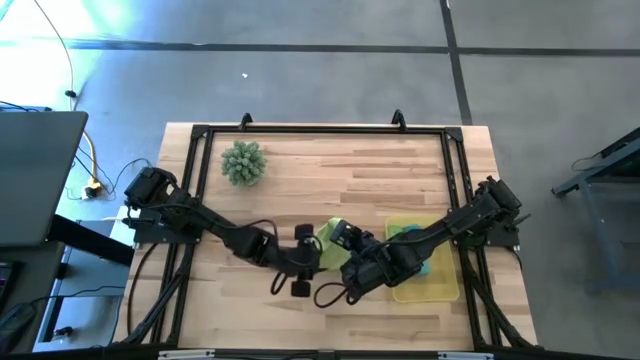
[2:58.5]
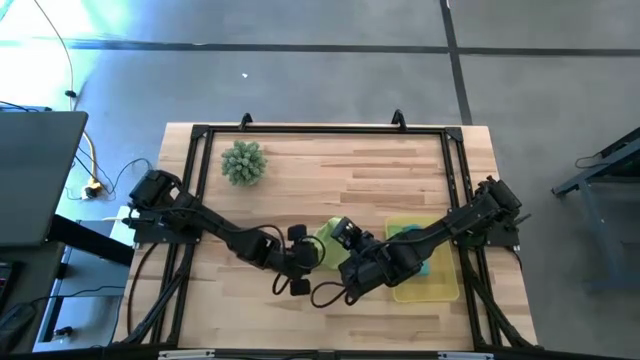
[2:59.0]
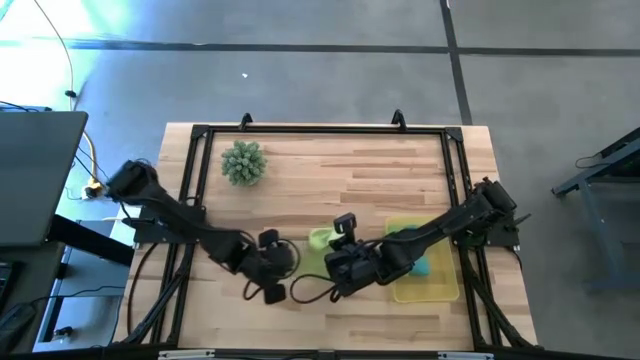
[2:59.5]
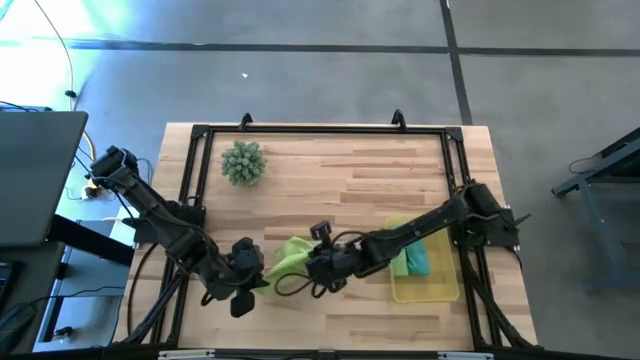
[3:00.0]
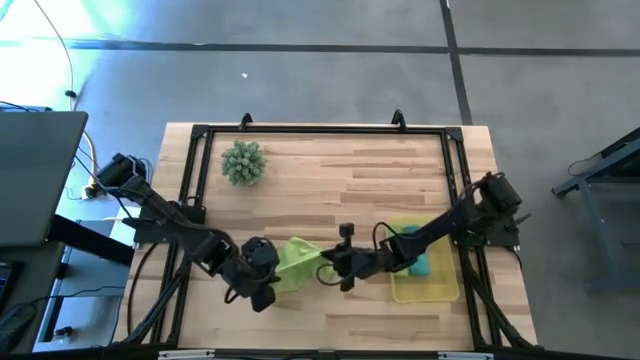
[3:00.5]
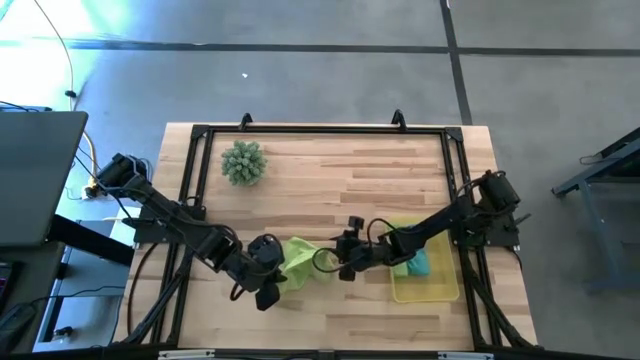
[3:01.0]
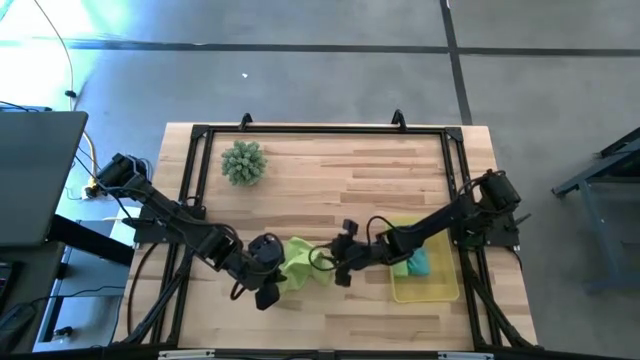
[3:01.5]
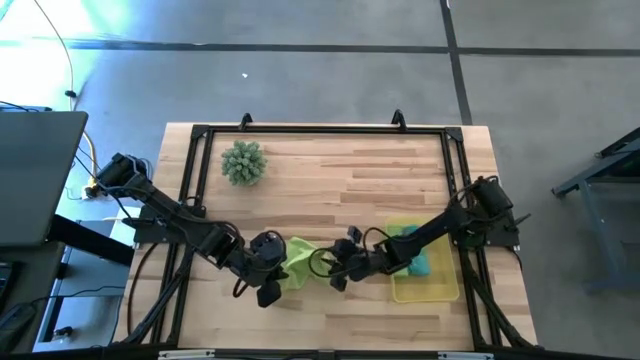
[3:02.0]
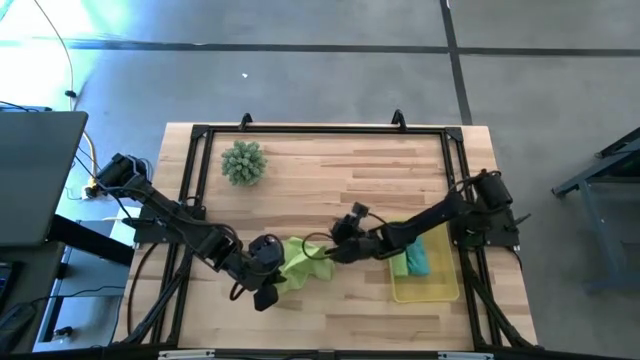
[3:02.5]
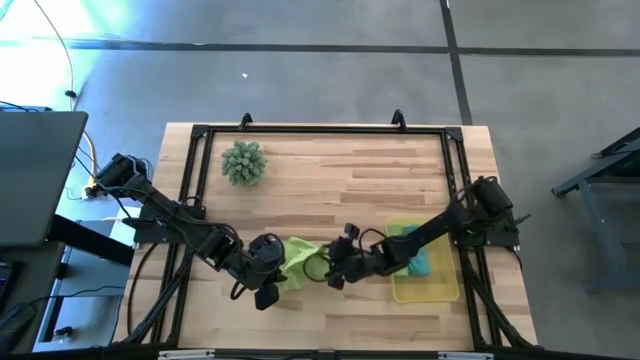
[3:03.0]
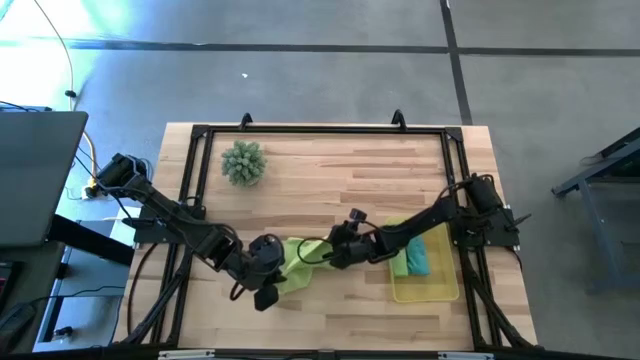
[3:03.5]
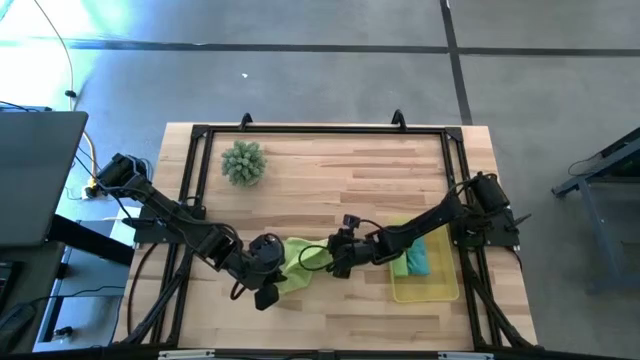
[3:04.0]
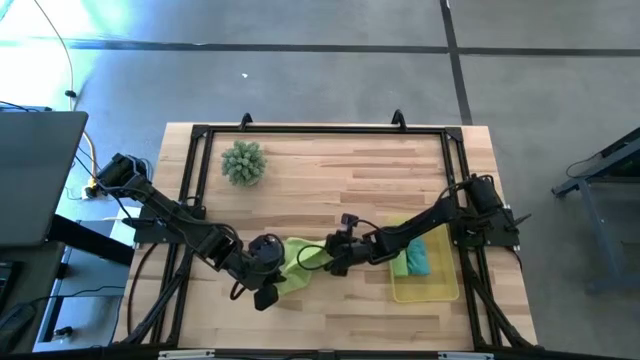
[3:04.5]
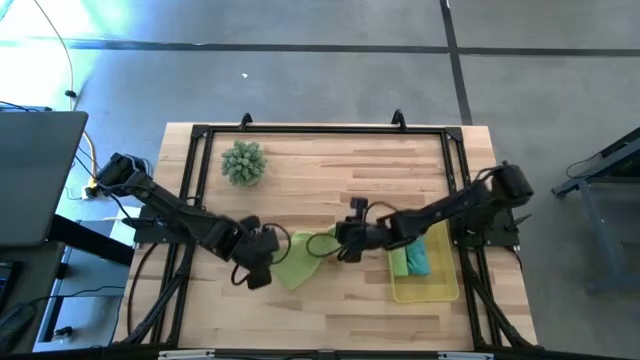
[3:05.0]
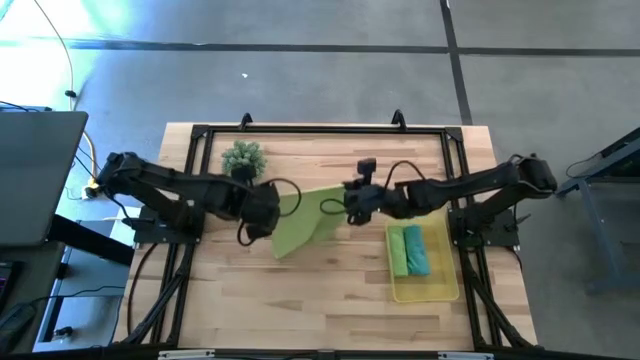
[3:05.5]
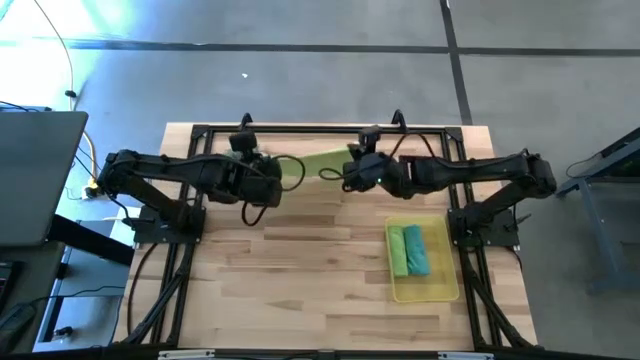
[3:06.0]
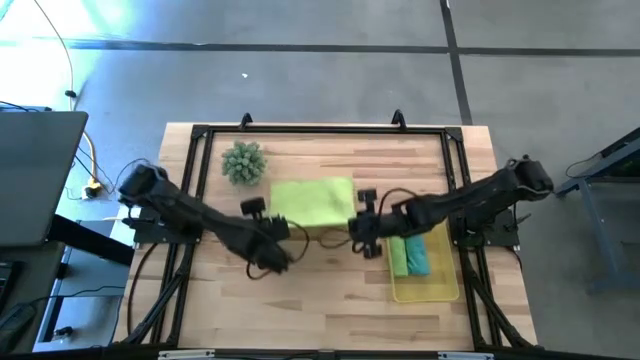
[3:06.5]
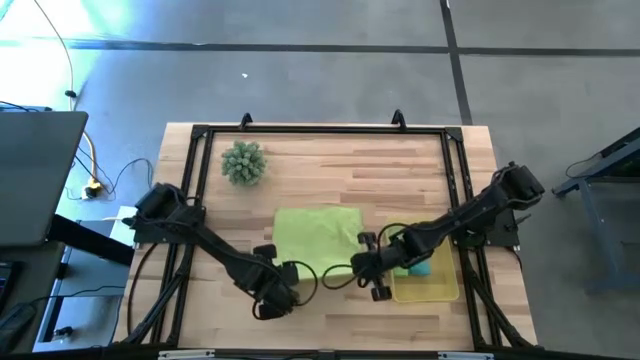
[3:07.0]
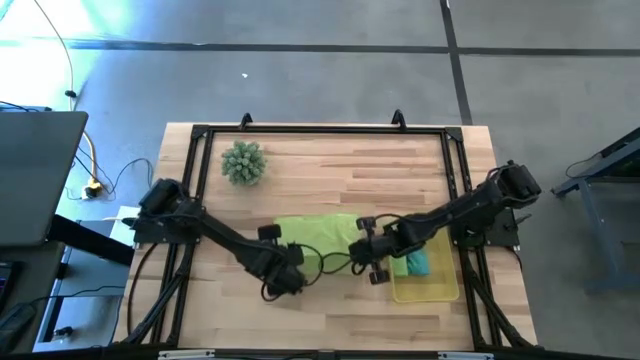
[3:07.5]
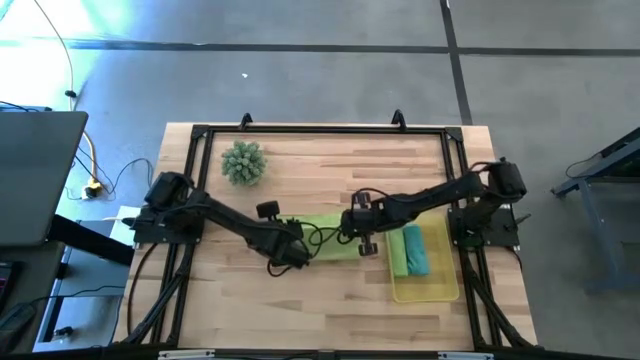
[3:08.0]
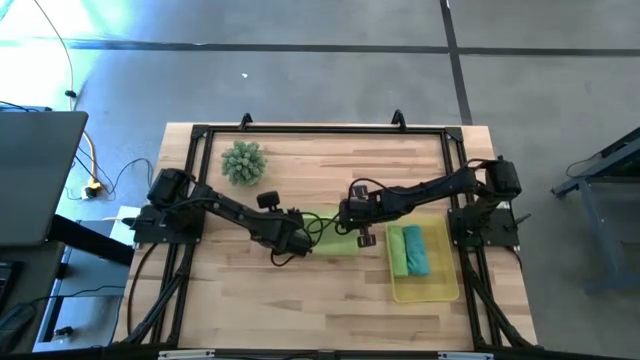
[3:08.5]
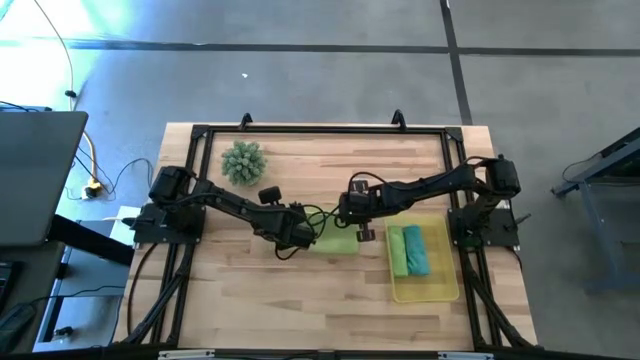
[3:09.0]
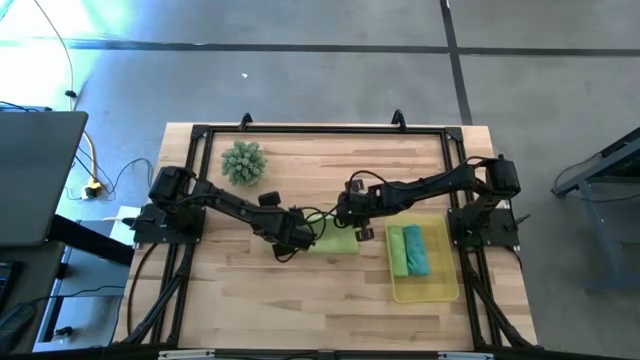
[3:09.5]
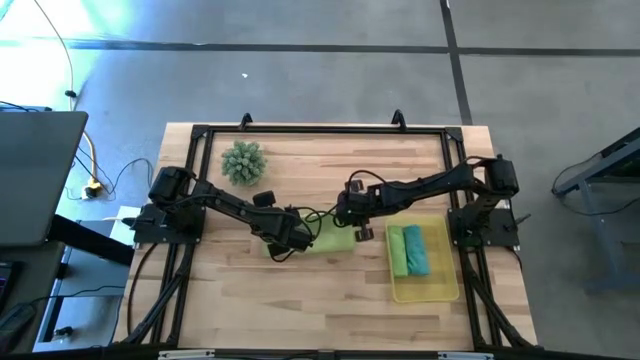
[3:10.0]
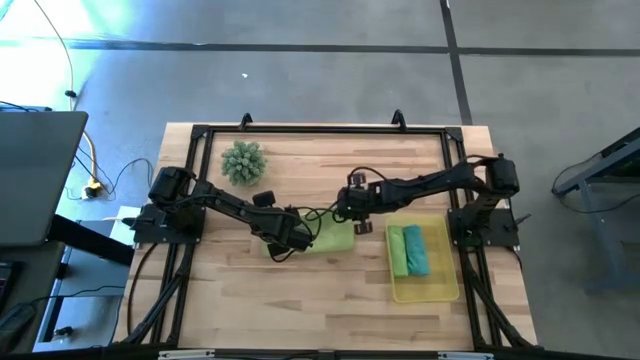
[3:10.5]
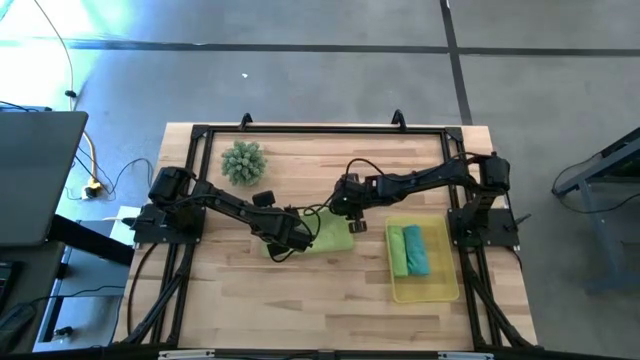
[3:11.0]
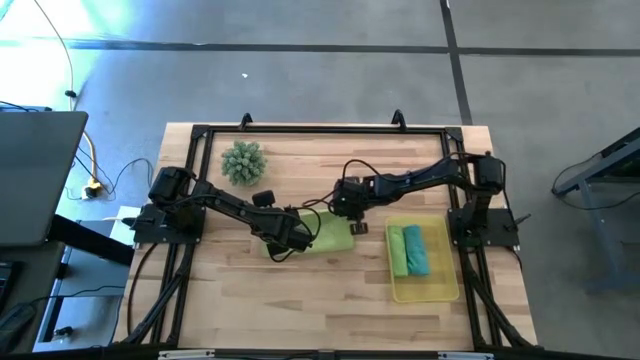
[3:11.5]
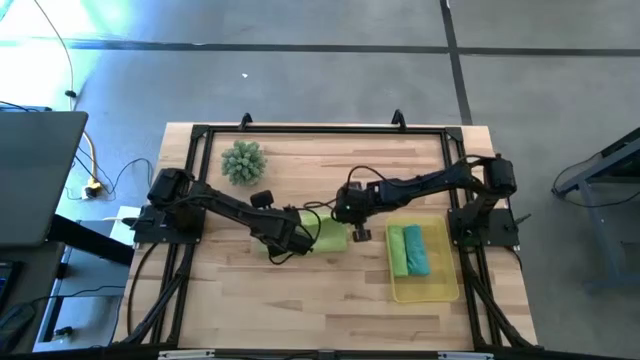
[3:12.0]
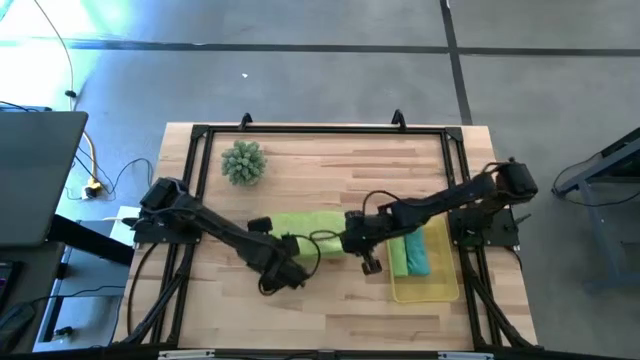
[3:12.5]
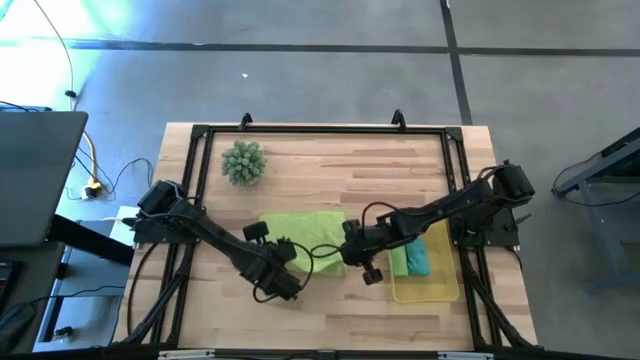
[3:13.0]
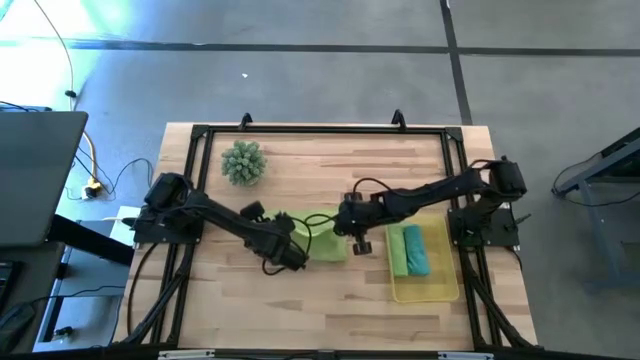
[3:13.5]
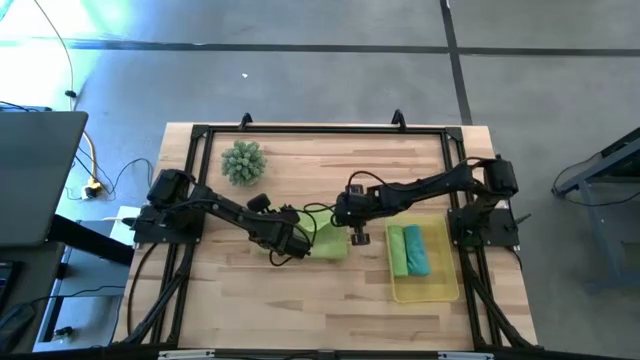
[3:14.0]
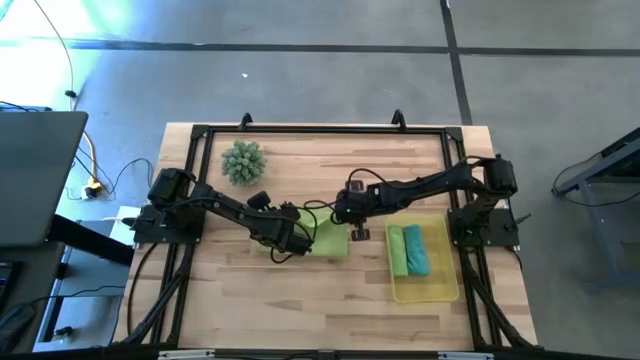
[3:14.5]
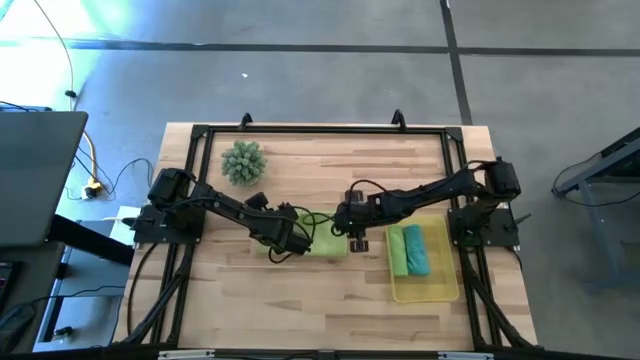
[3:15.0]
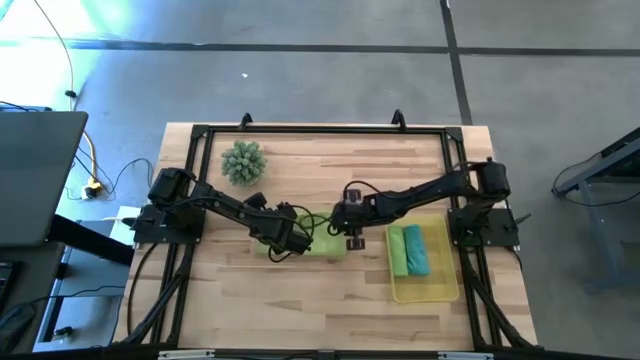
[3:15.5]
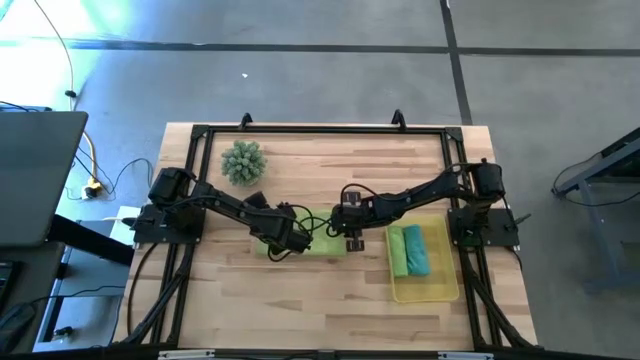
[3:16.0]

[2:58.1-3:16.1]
Task: Roll microfiber towels into tight, uniform cylinder then place into a basket
Fold the light green cloth

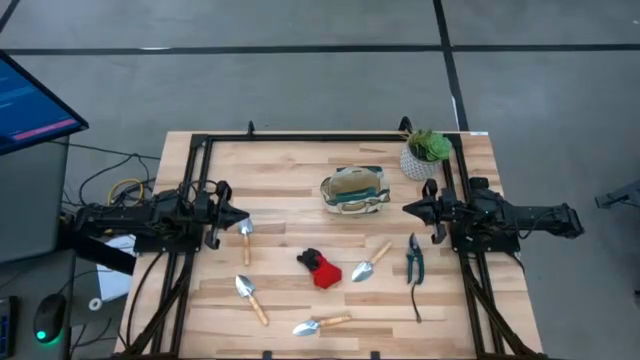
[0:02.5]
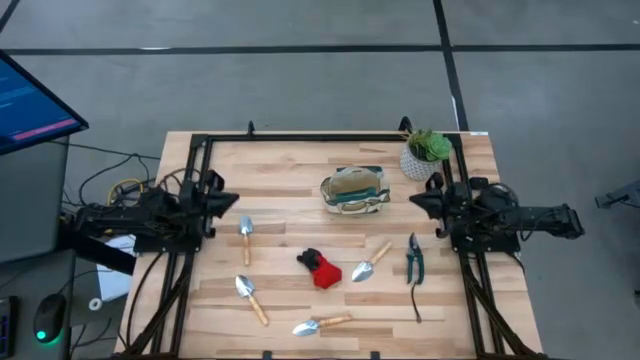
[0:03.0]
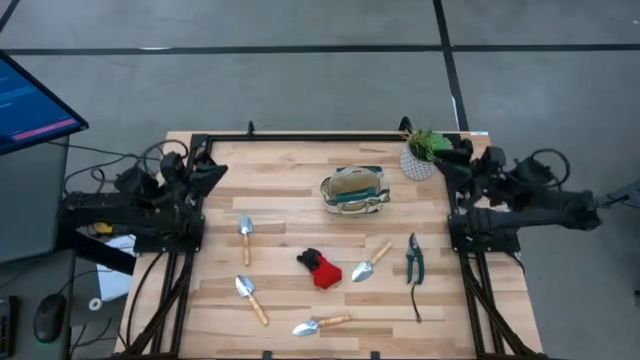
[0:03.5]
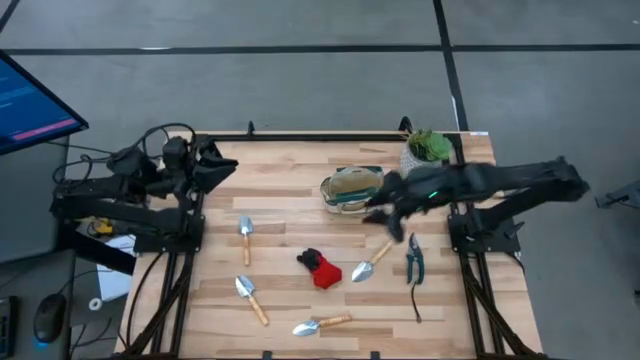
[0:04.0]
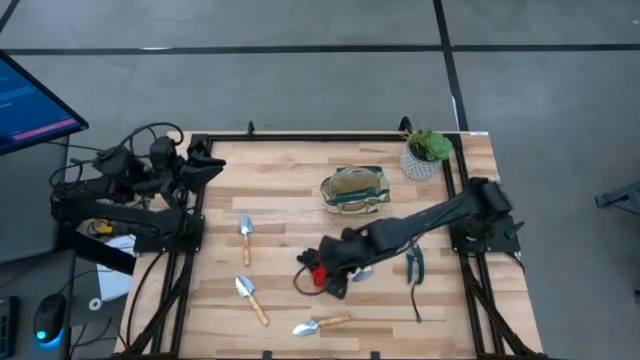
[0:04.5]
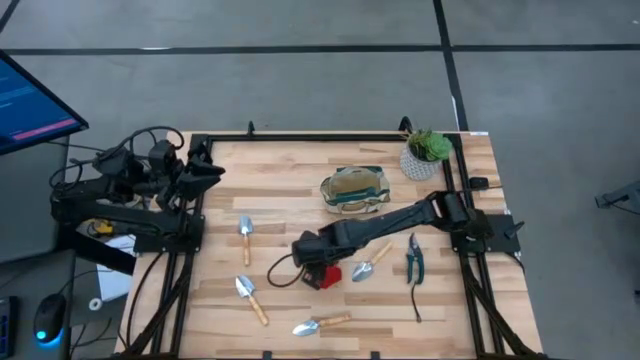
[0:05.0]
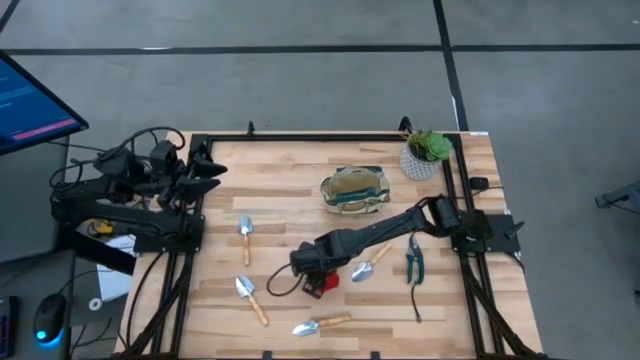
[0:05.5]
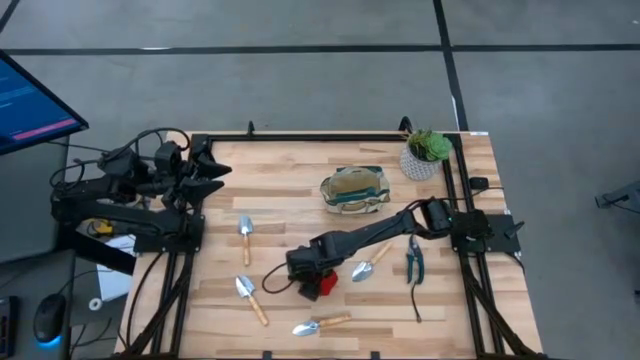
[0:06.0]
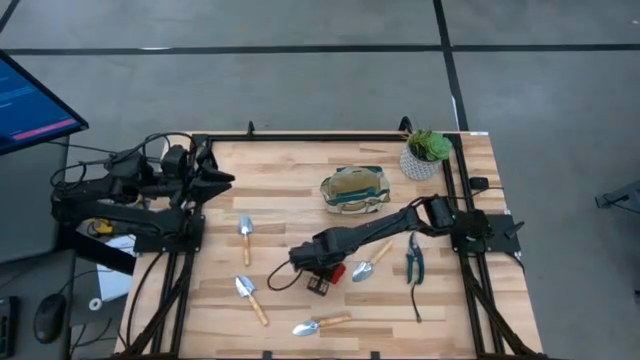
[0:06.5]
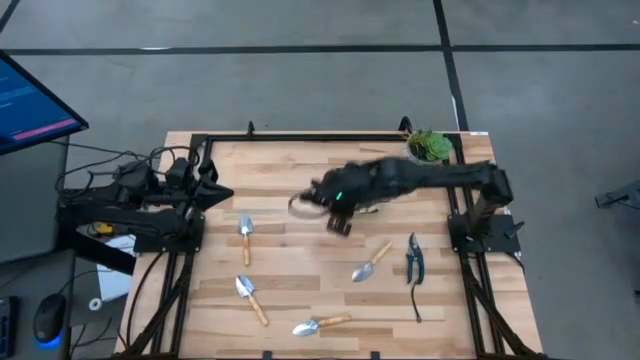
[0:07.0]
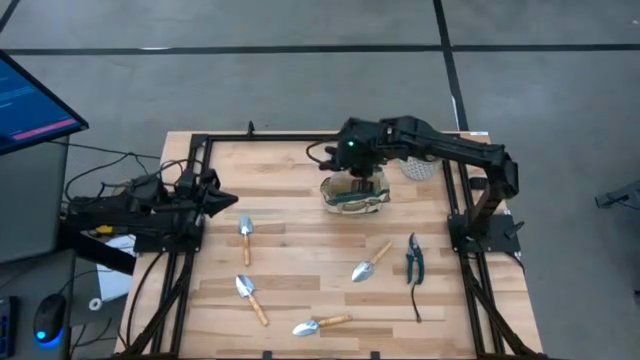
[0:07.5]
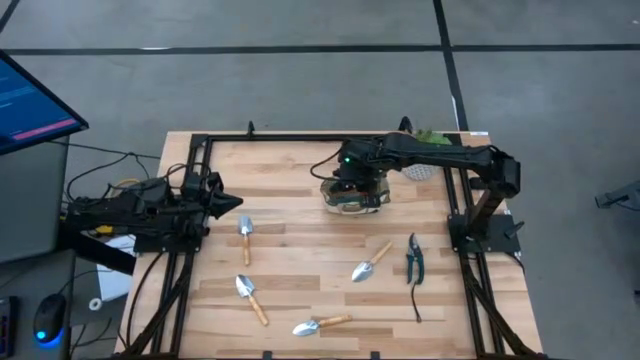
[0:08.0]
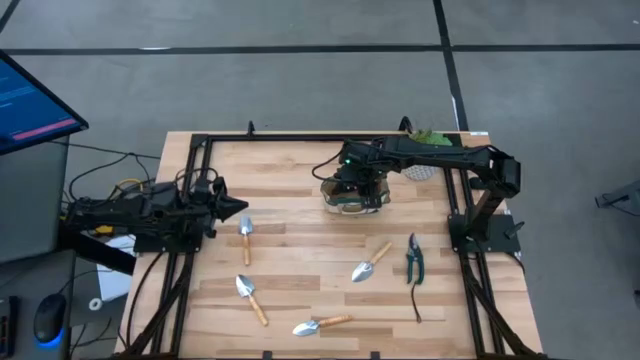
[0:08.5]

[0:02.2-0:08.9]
Task: Pick & Place Garden tools in Gardening bag
Put the glove into the gardening bag
